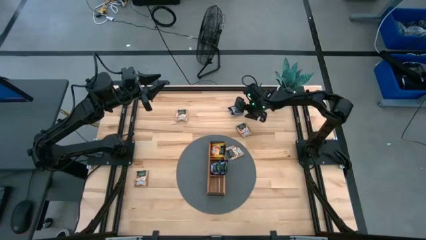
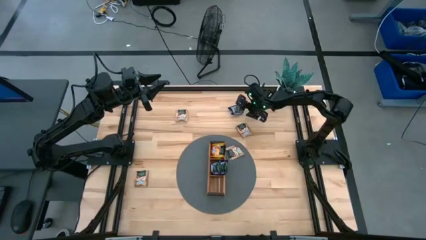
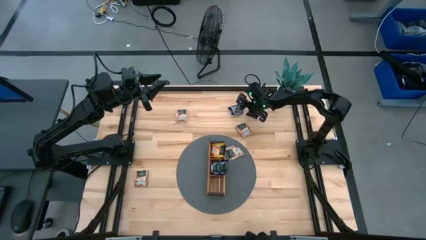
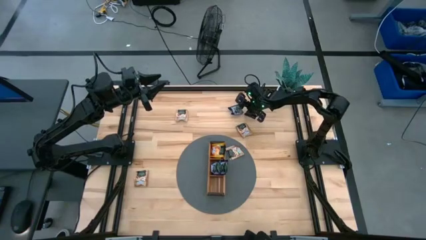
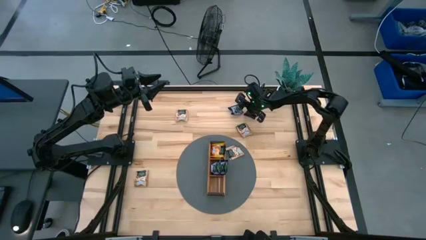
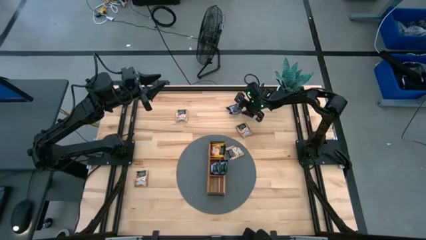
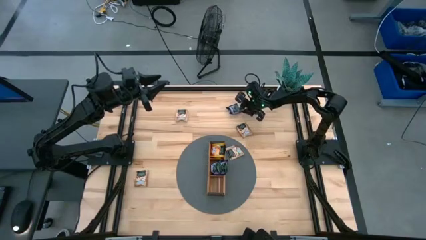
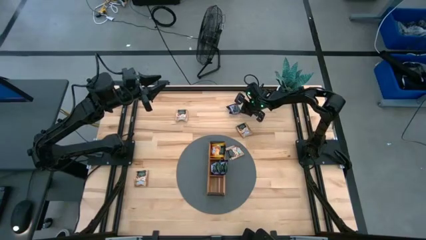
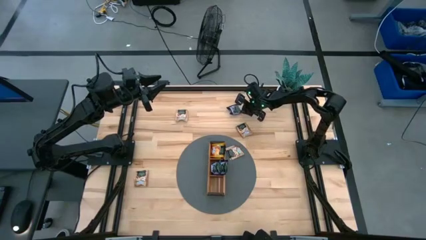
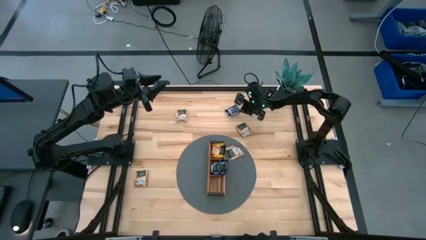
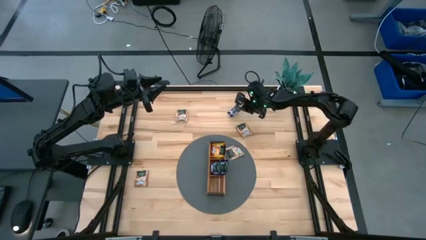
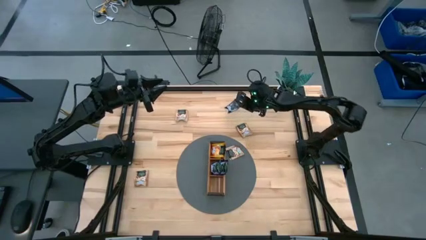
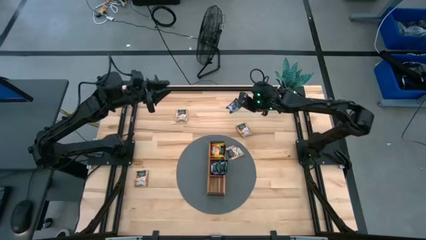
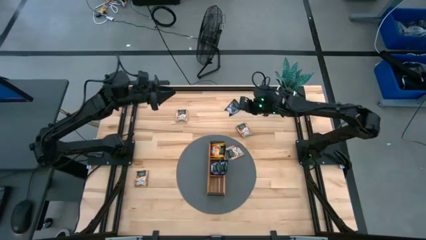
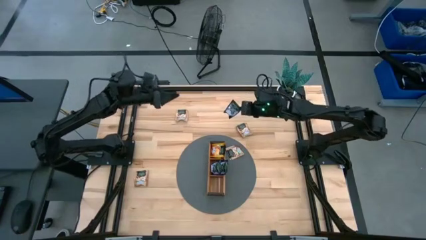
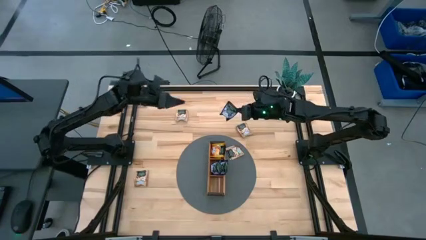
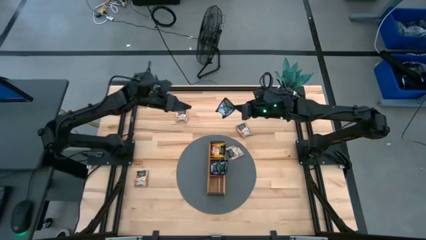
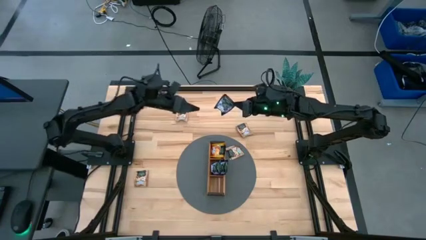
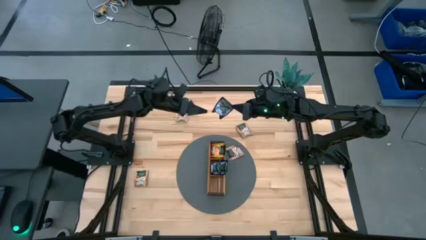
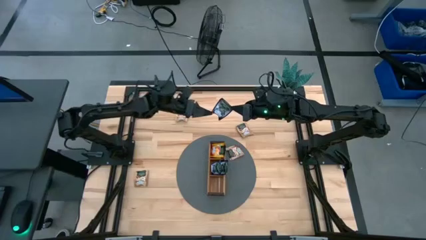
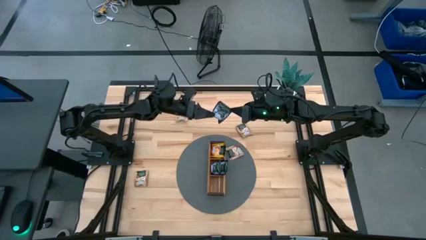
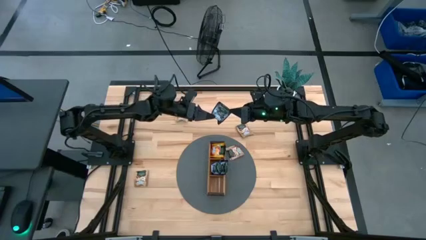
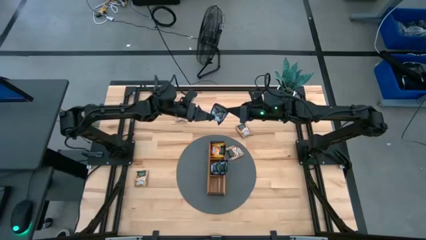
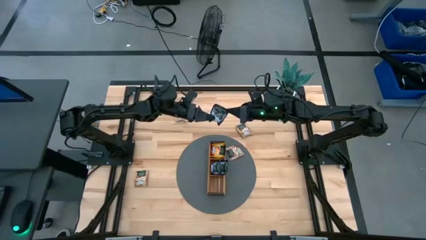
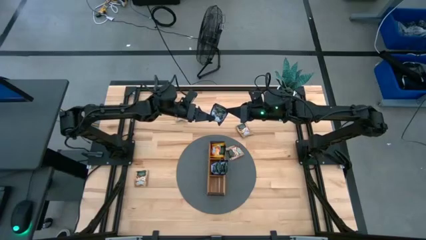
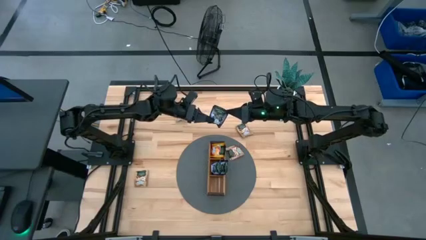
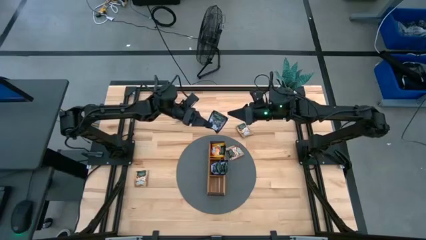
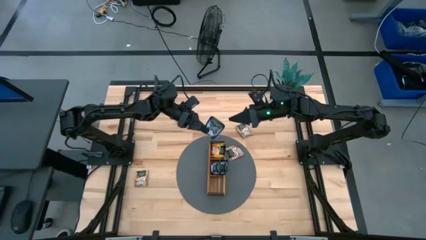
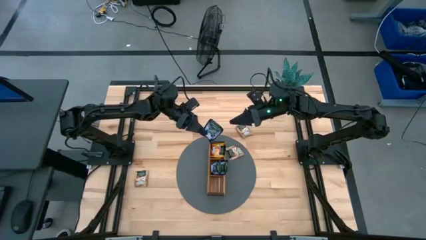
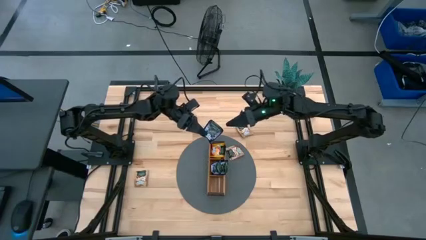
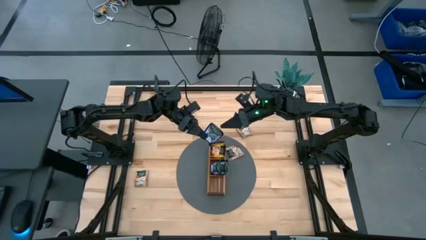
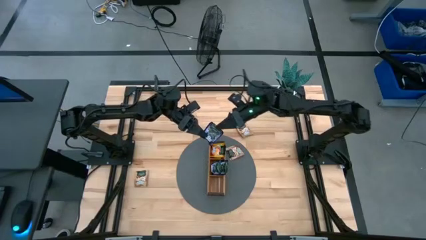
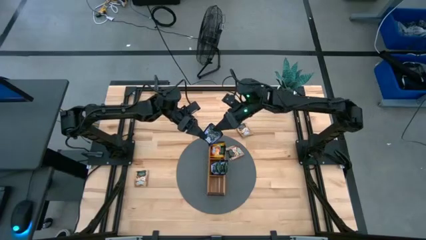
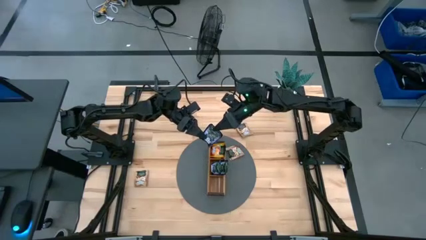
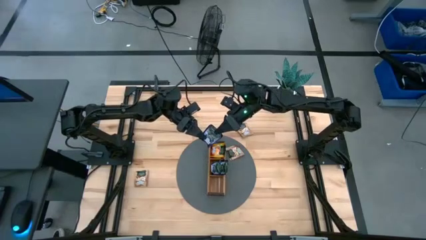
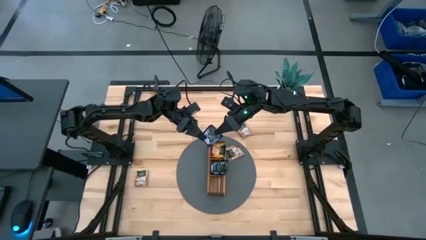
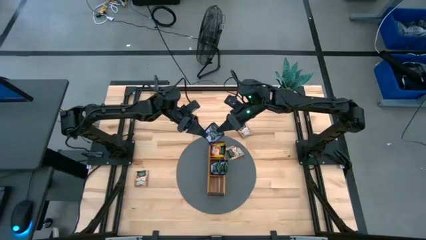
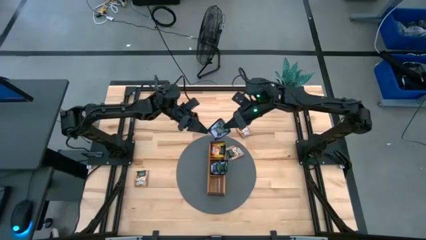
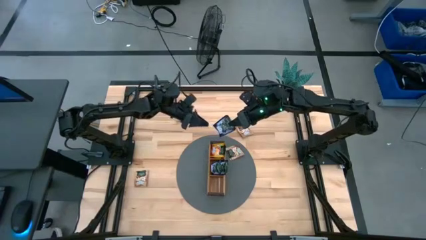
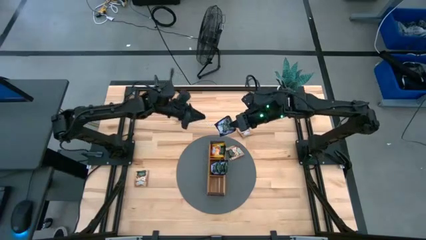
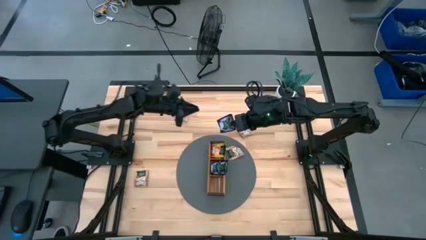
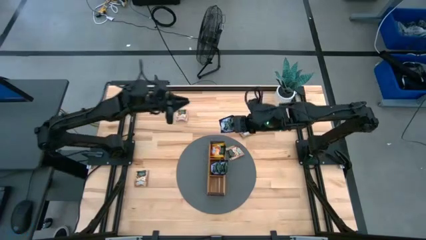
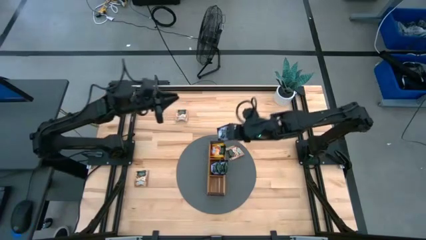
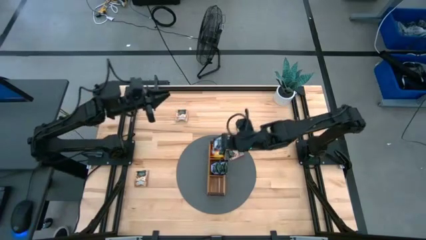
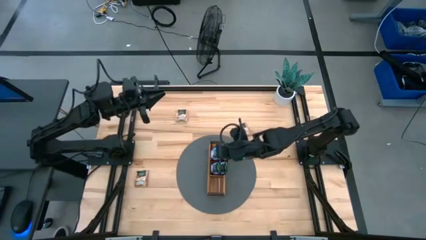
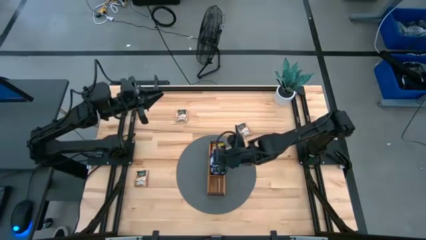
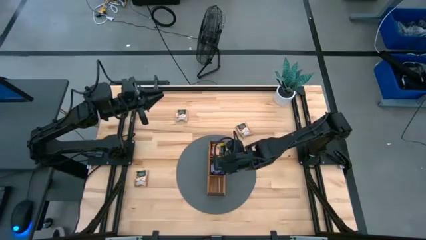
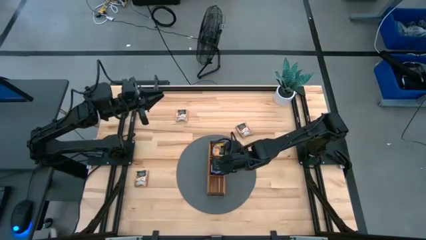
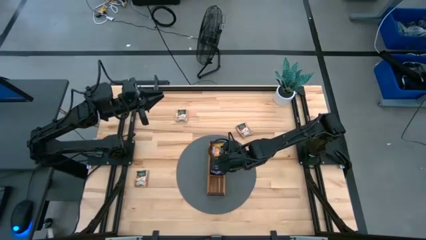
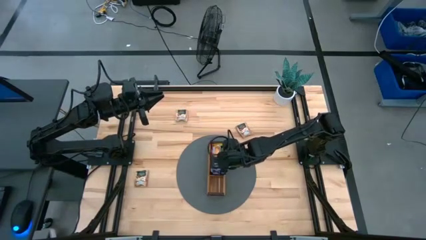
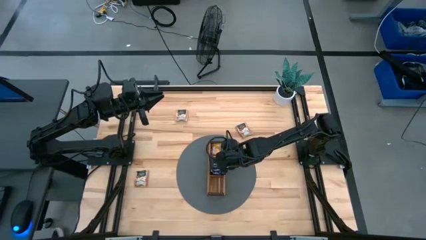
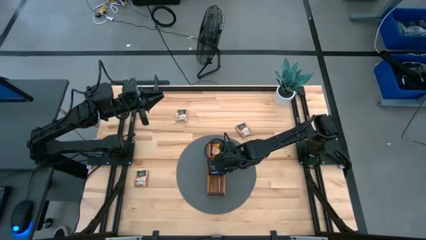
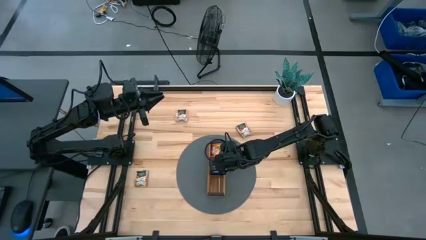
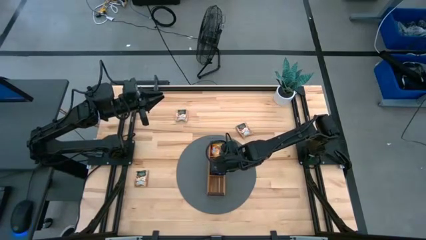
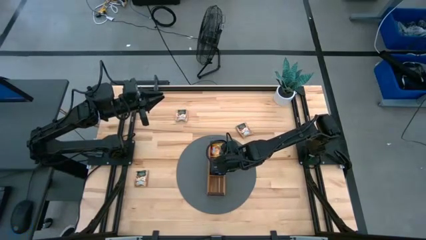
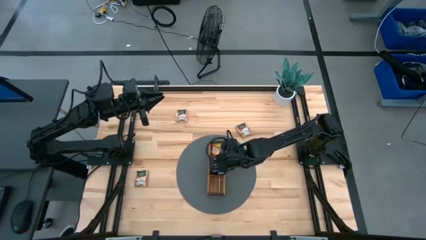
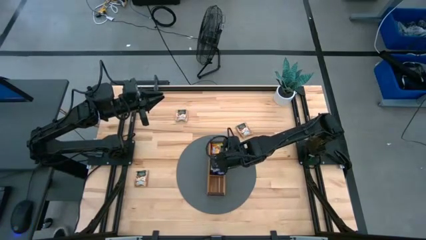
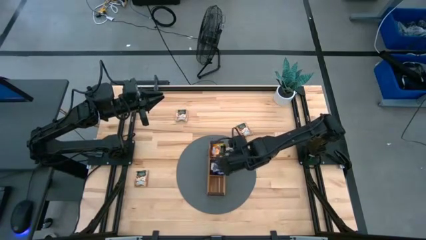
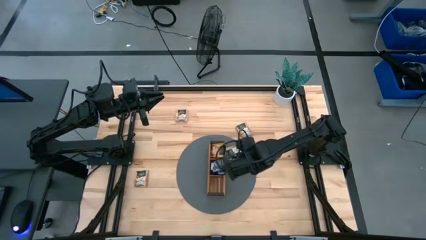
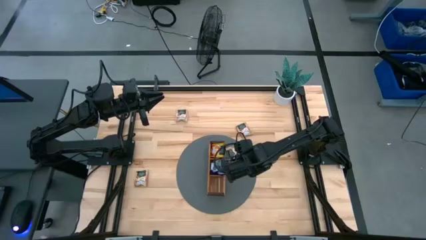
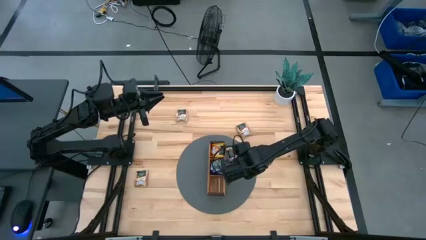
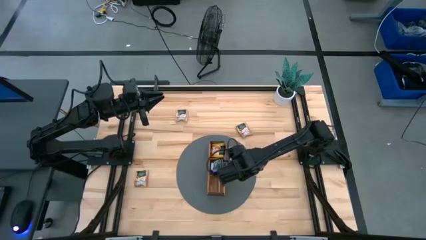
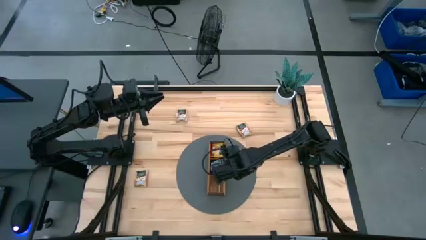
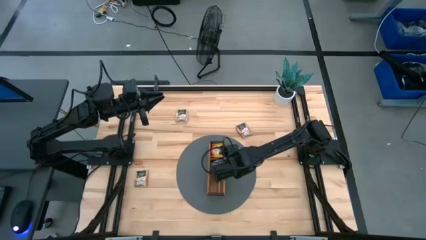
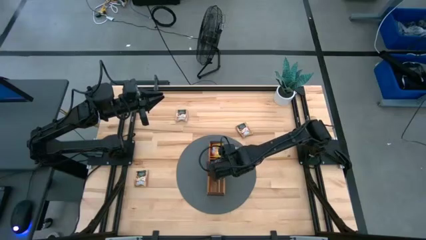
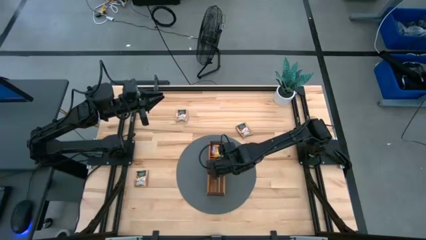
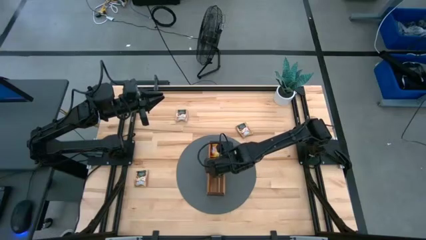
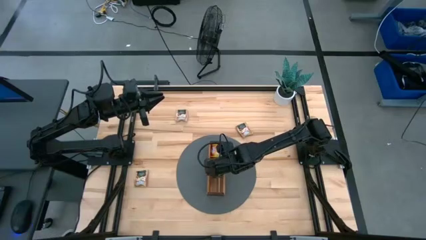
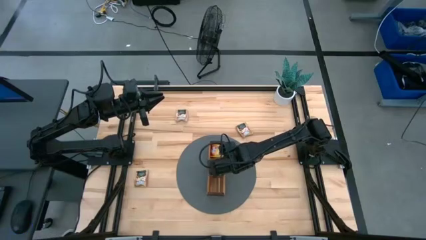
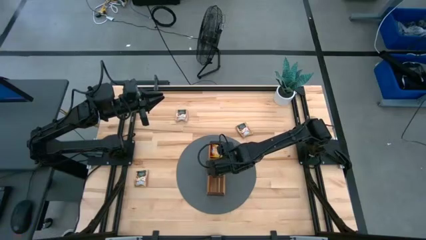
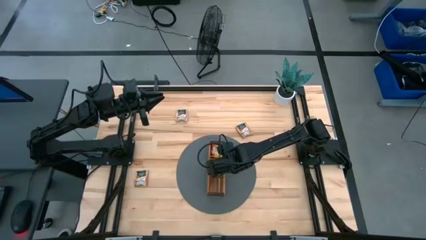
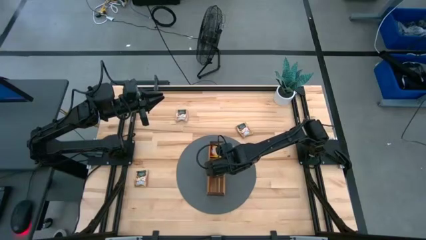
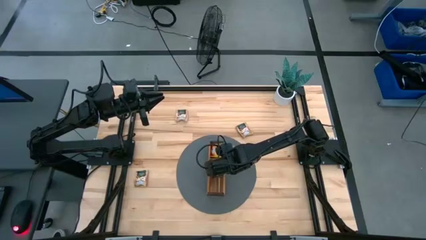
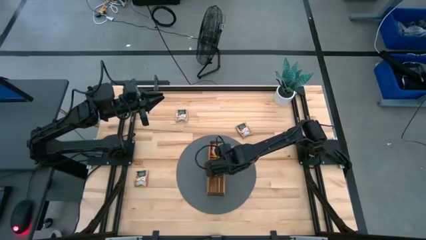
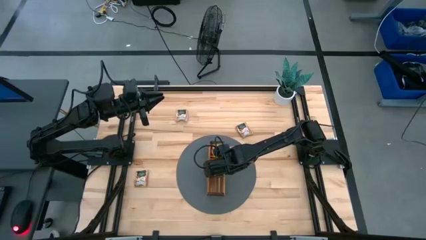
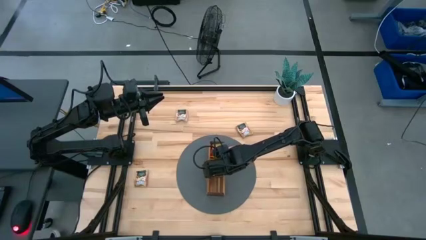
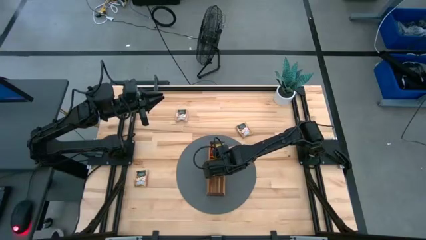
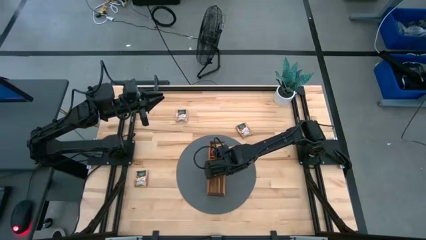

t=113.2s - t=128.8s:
Task: Pick & Place Tea
Put the purple tea bag into the middle section of the wooden organizer
